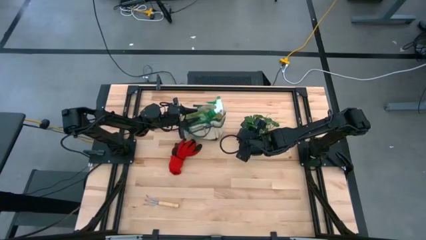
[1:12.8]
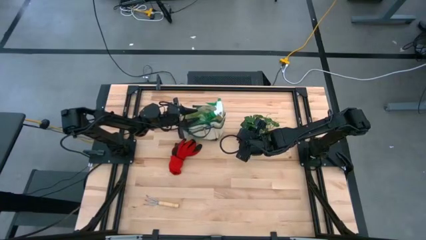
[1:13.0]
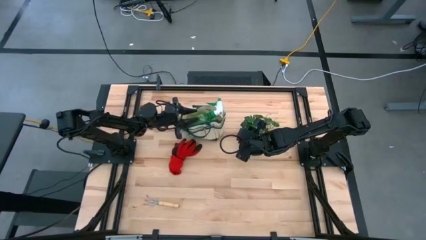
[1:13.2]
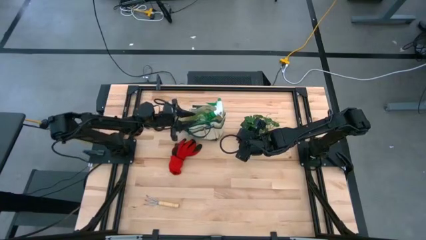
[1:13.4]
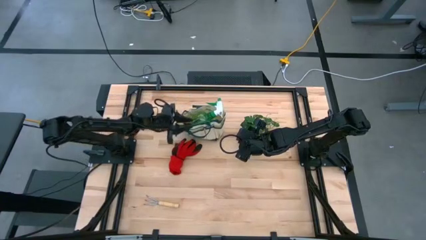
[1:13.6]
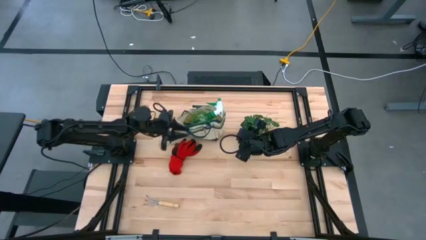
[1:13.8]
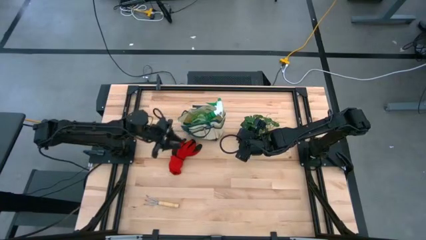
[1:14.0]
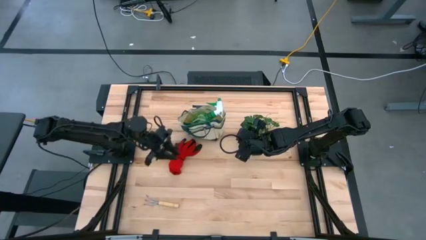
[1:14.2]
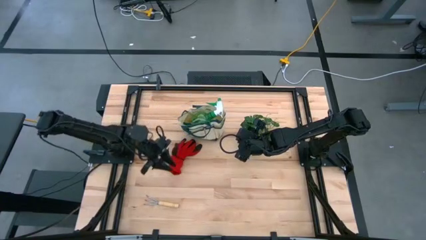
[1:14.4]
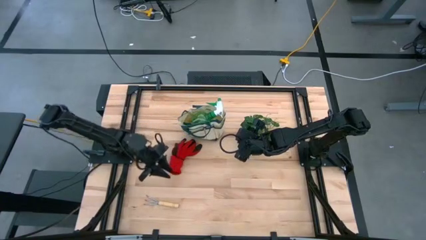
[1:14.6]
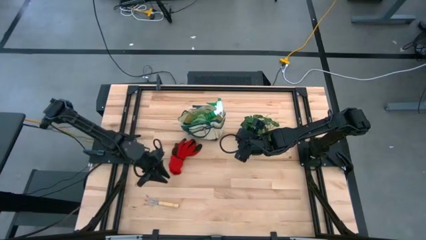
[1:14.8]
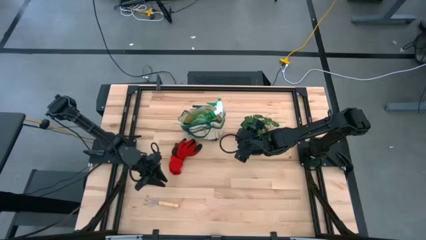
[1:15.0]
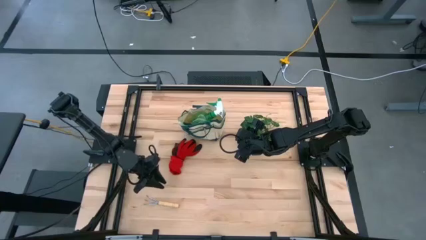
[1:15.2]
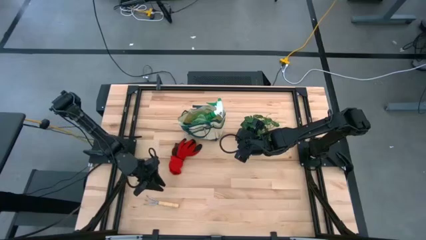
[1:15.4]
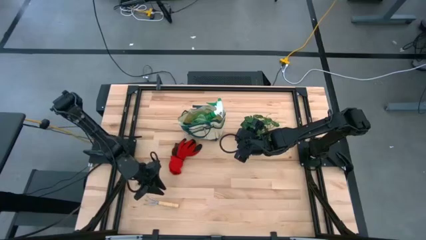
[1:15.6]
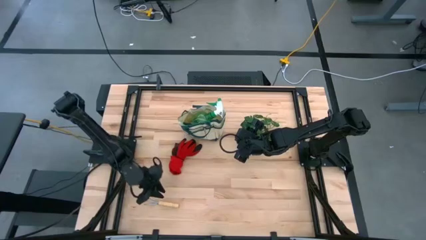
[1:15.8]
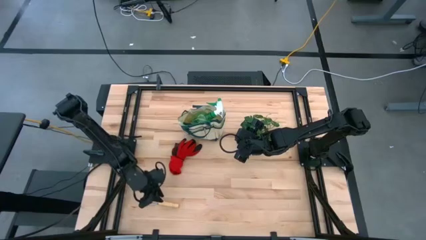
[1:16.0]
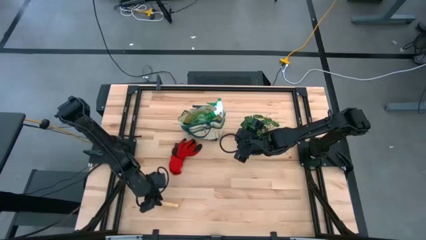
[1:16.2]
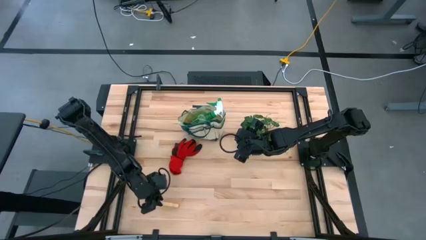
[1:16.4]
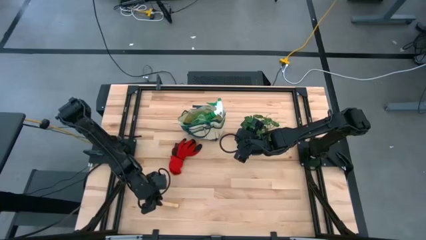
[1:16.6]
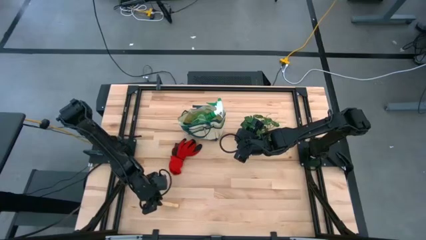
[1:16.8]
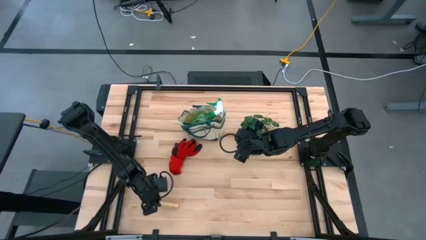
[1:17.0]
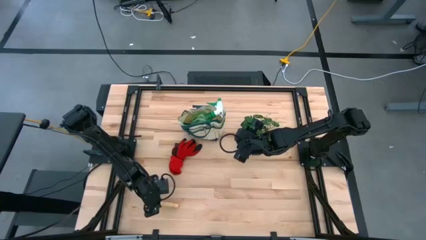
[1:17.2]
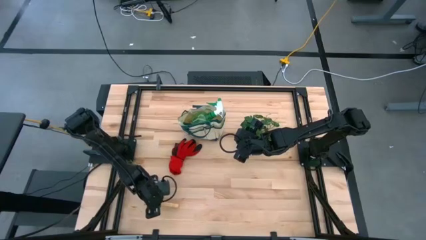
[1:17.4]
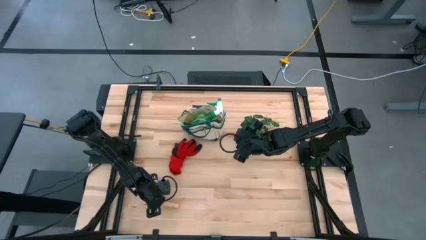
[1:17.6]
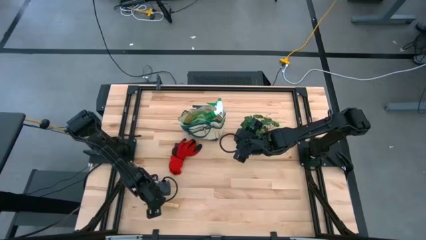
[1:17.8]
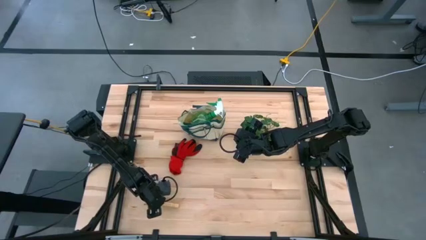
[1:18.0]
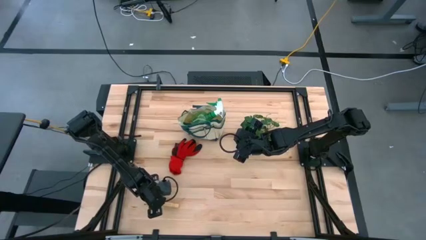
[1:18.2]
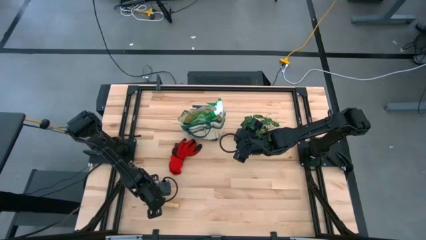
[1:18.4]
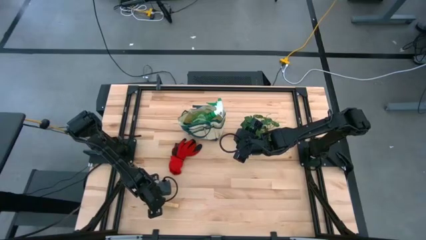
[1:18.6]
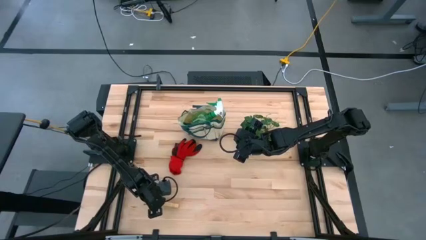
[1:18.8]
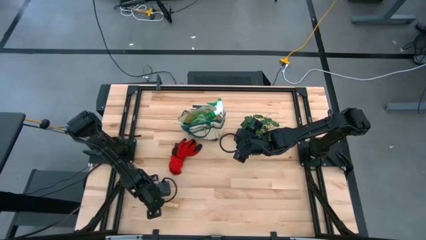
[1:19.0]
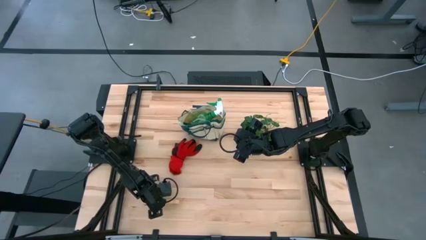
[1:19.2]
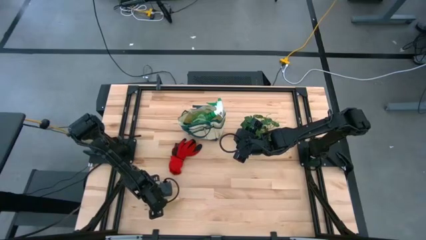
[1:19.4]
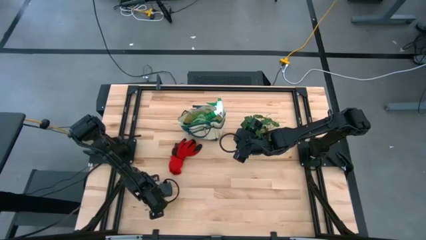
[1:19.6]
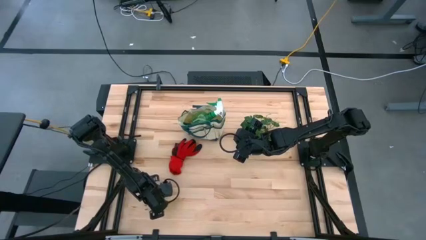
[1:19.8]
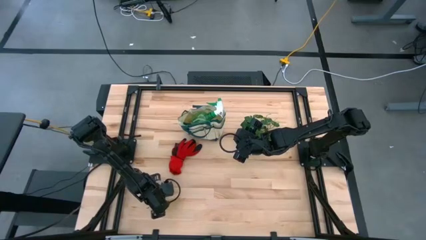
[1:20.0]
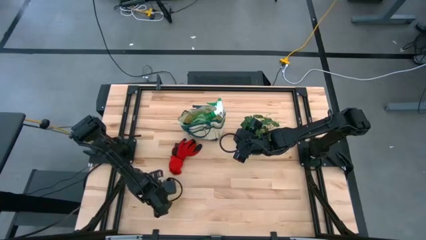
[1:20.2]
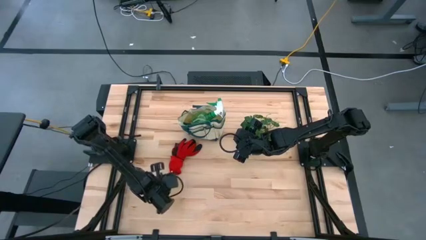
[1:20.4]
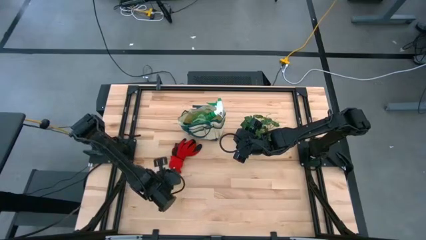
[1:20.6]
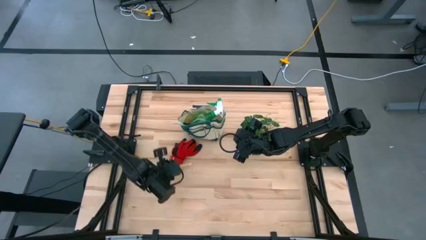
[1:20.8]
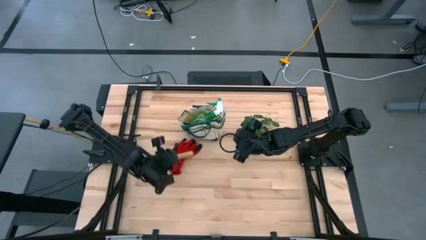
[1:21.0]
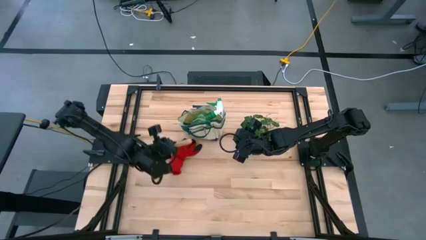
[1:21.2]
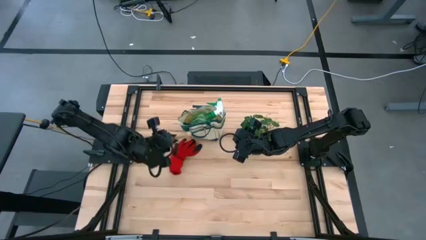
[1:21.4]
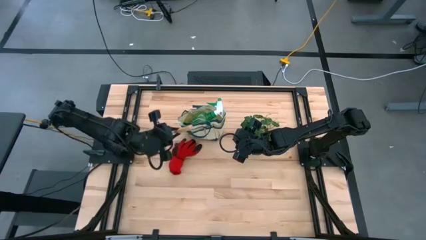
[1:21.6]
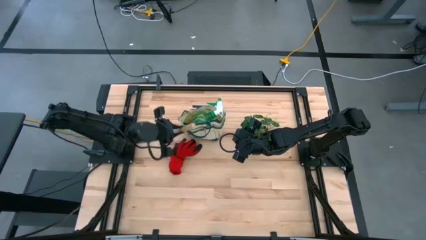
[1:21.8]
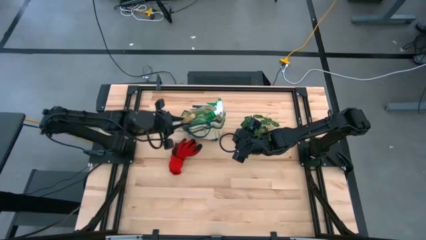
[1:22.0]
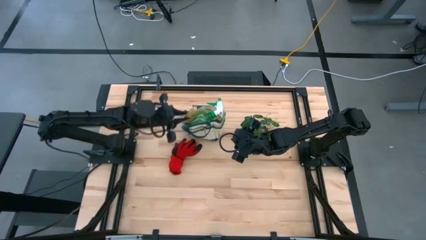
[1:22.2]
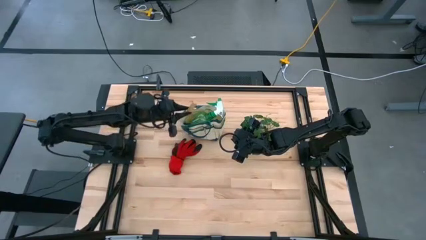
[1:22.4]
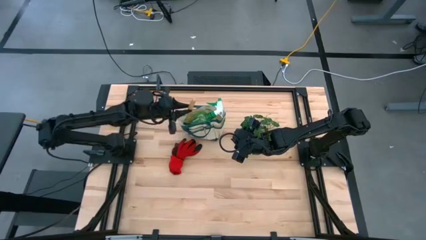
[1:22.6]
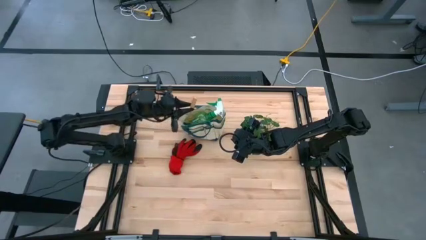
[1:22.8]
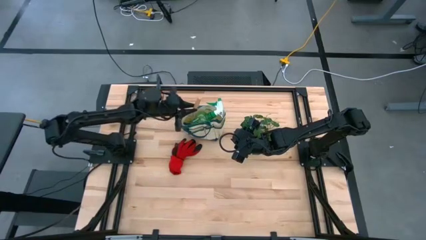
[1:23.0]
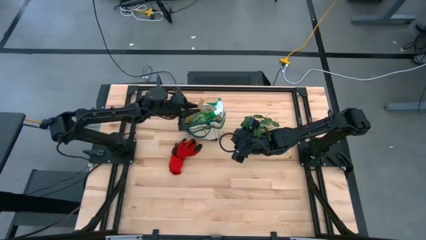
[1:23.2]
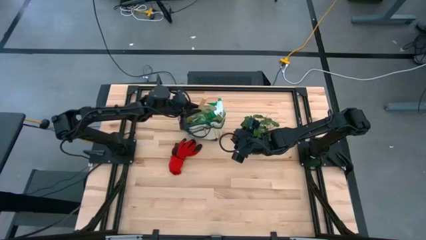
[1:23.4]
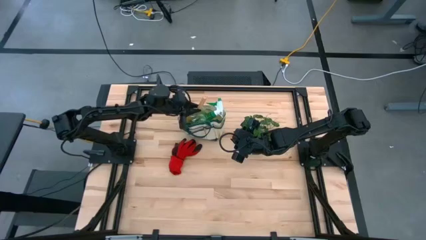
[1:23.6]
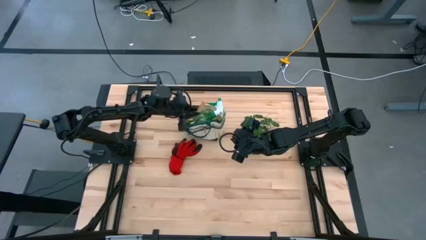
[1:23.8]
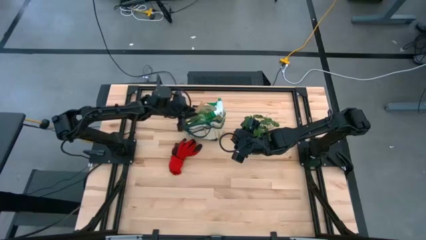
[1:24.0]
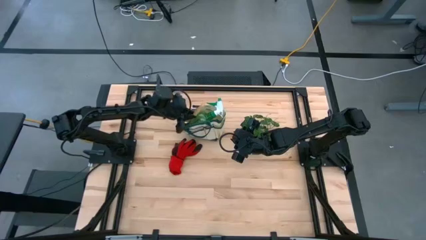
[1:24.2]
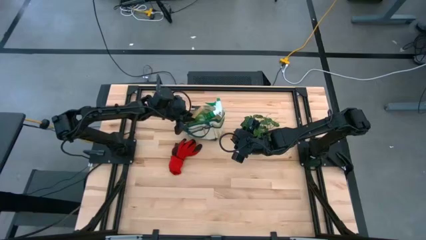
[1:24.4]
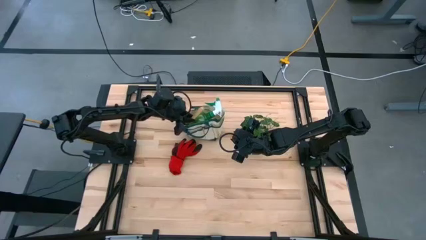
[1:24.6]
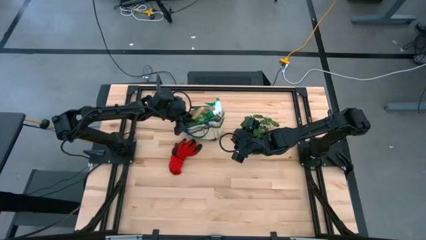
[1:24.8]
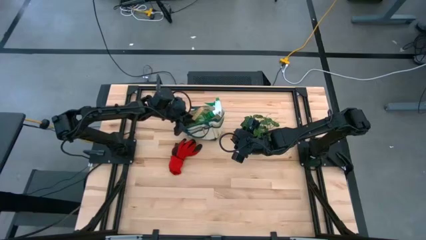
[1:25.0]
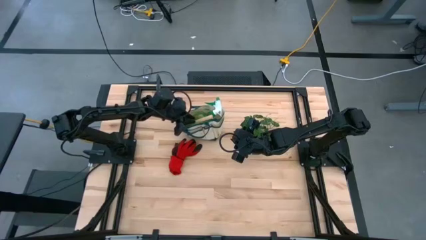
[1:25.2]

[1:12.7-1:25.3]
Task: Pick & Place Garden tools in Gardening bag
Put the light brown hand rake into the green gardening bag
